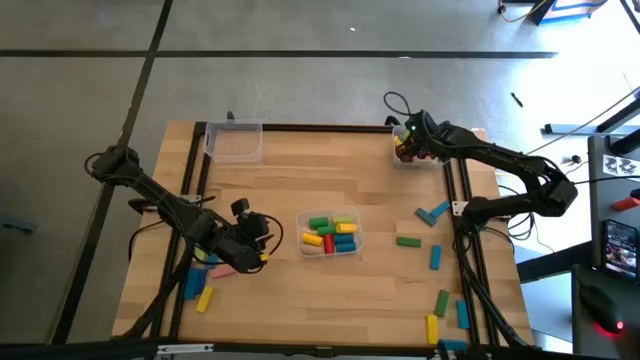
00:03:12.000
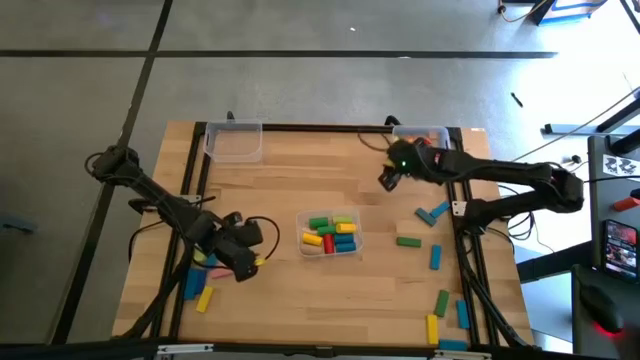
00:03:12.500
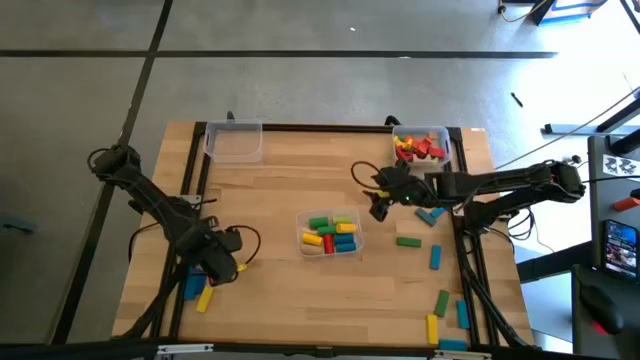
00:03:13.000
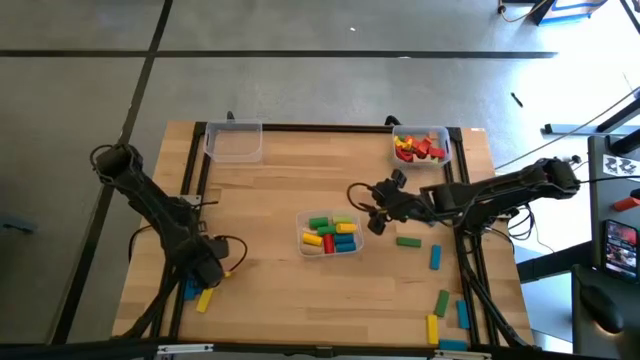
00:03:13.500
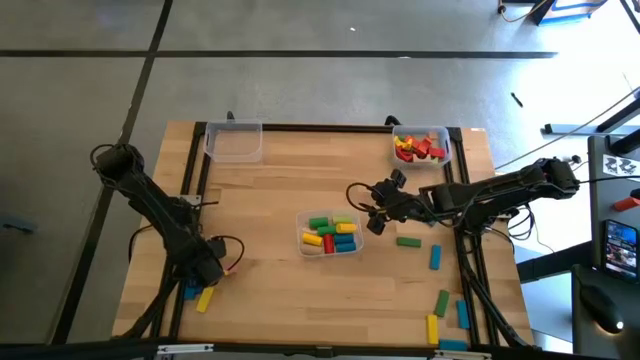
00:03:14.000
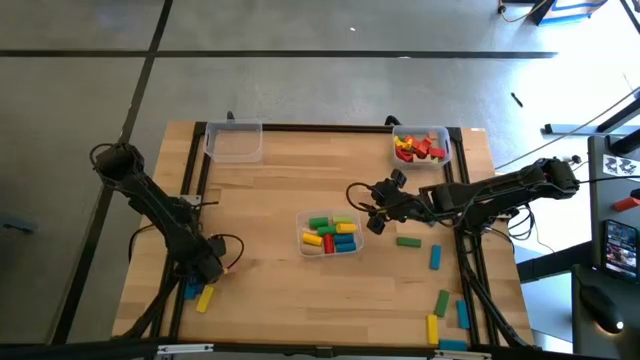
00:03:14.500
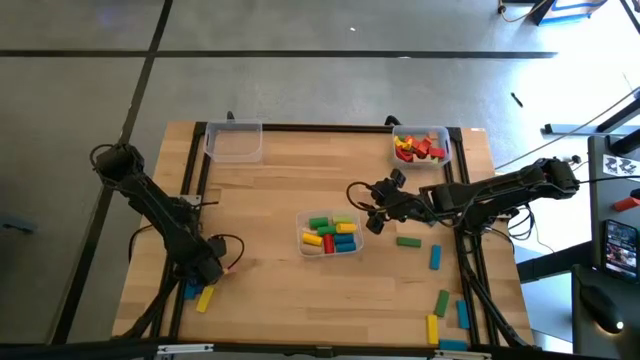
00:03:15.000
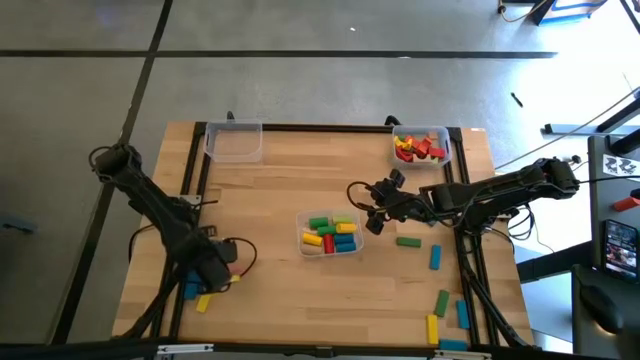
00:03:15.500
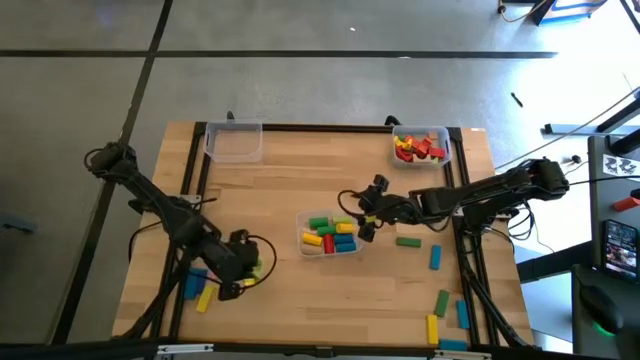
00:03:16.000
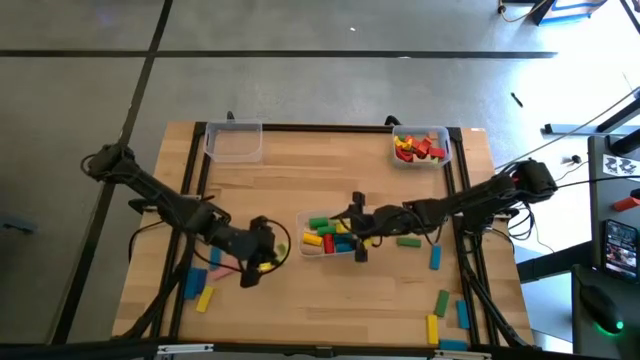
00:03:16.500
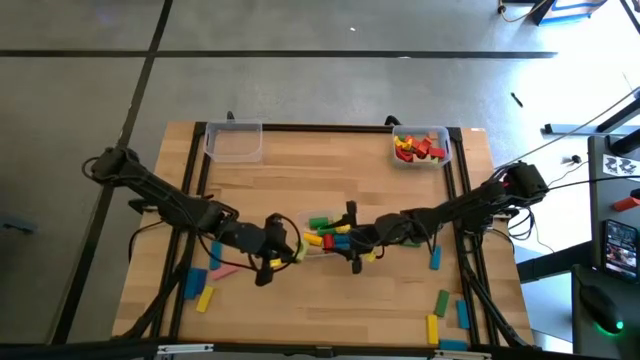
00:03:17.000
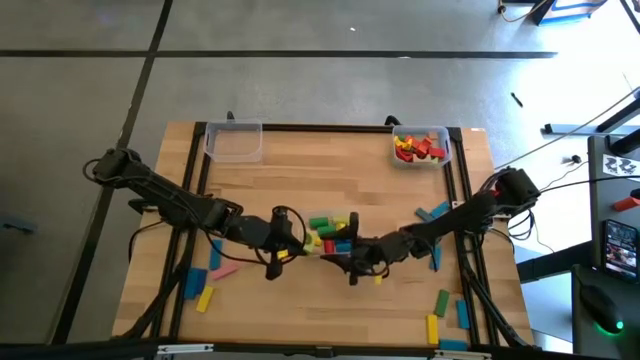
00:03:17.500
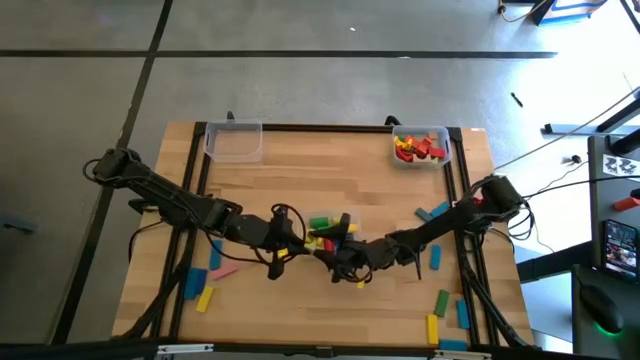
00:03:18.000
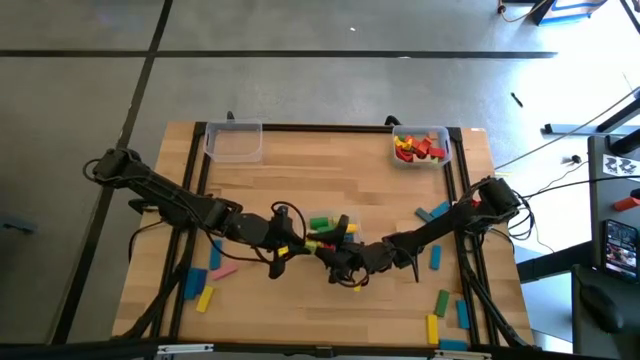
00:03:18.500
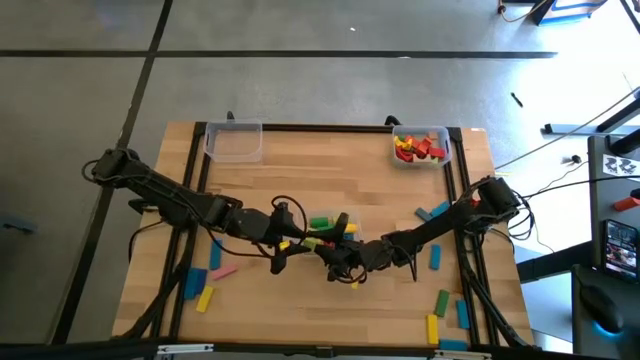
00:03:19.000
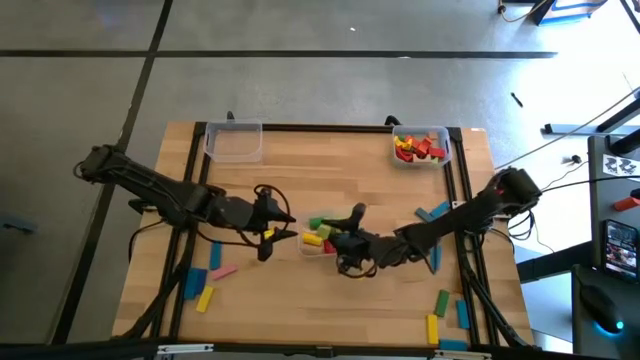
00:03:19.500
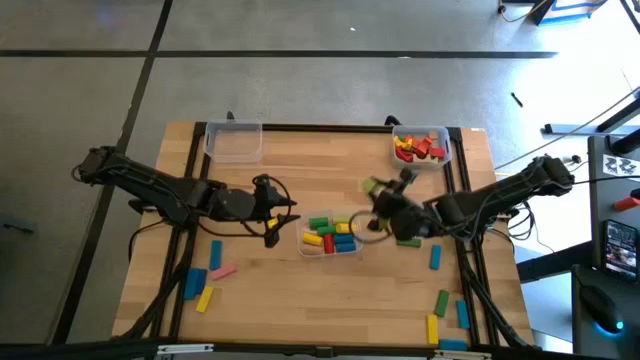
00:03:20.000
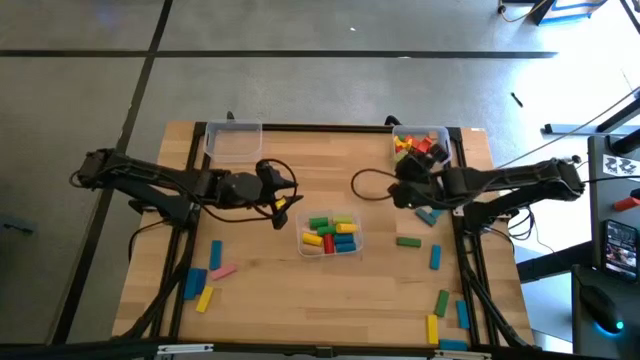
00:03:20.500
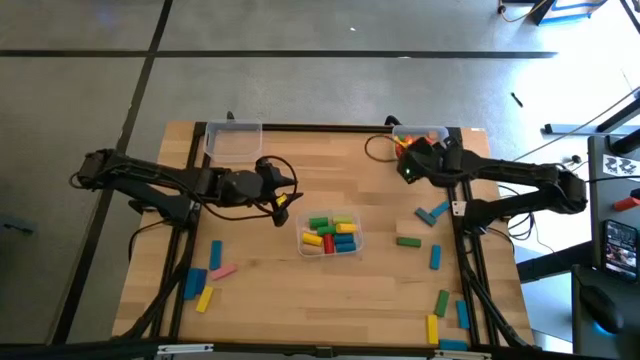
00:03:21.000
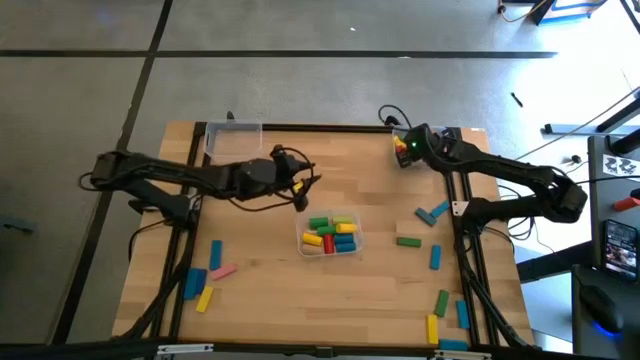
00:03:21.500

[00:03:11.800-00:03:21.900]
Task: Sort blocks by size
Put the light green arch block into the top right transparent bin

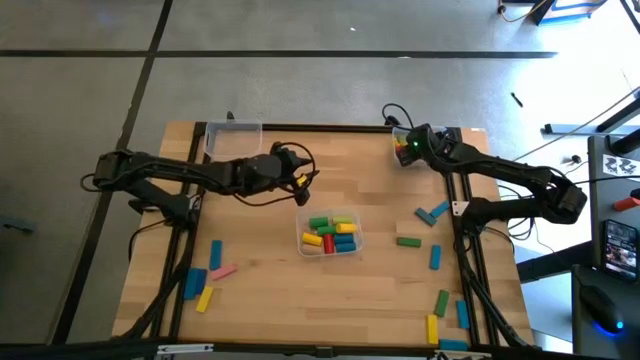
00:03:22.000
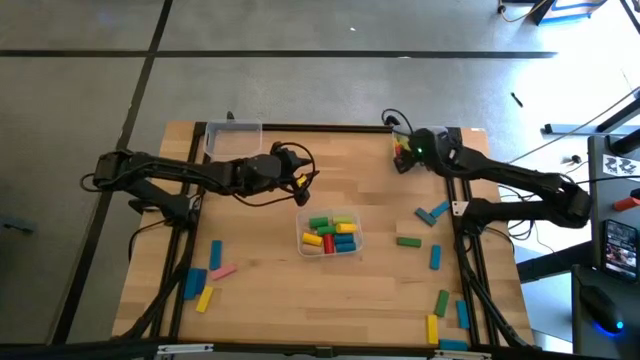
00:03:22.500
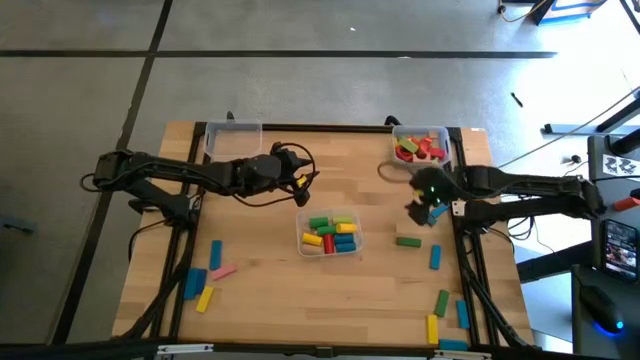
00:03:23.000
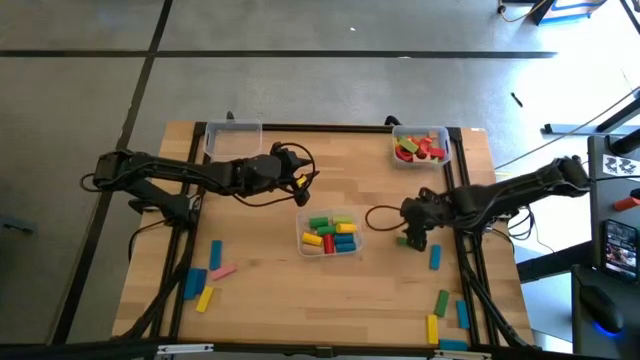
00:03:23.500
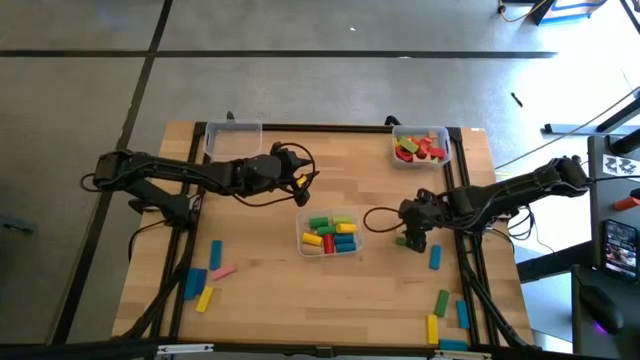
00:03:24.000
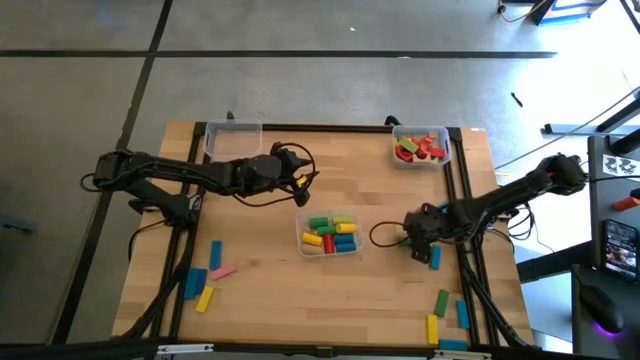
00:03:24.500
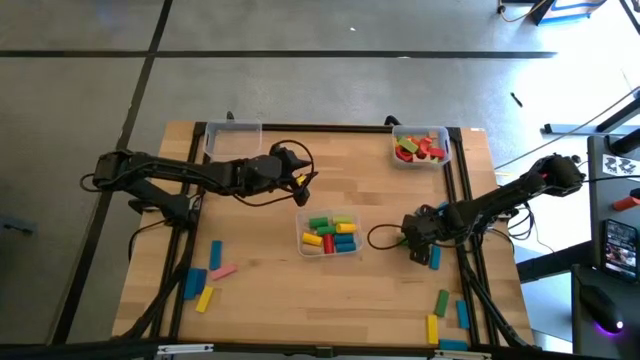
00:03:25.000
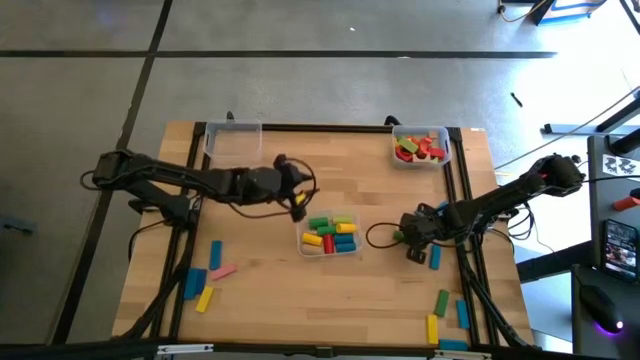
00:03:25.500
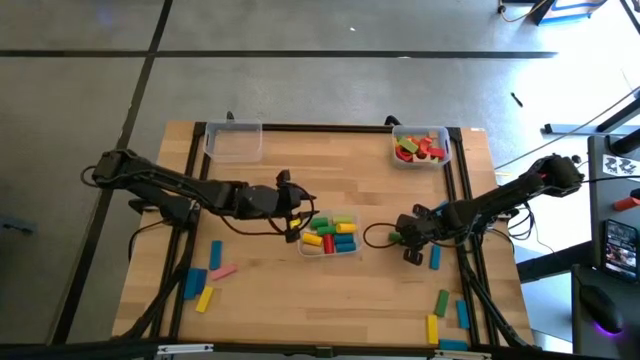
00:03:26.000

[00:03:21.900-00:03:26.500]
Put the green rectangular block into the top left transparent bin

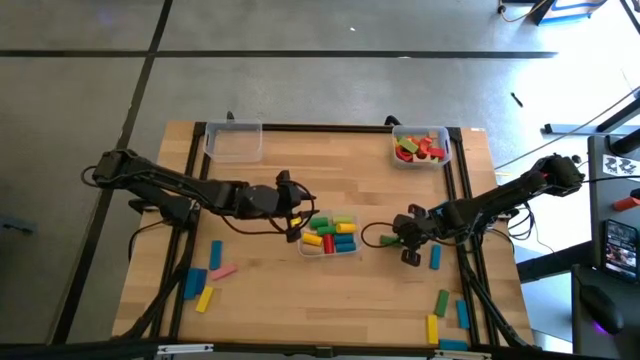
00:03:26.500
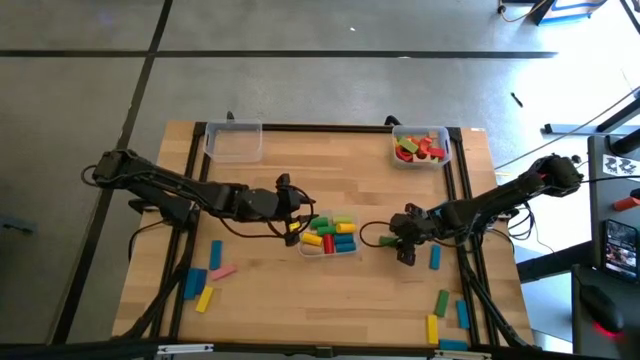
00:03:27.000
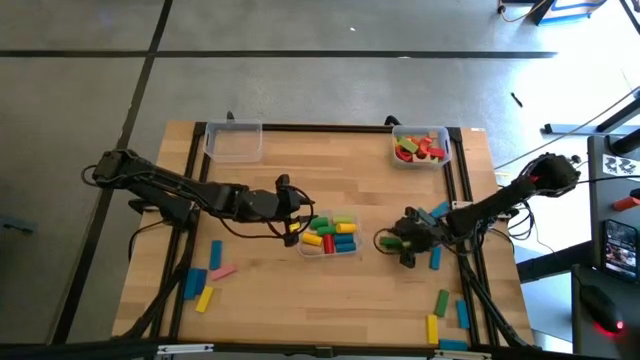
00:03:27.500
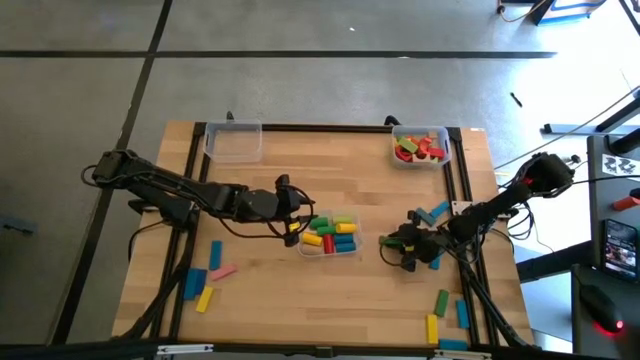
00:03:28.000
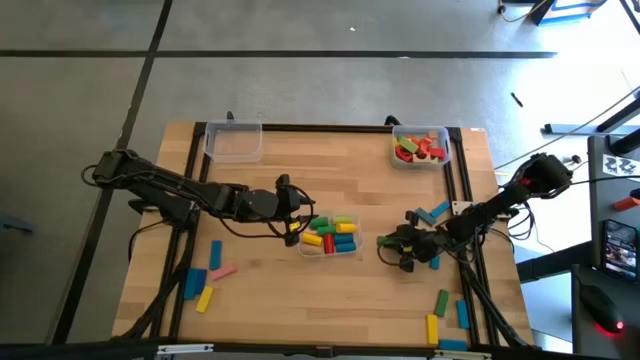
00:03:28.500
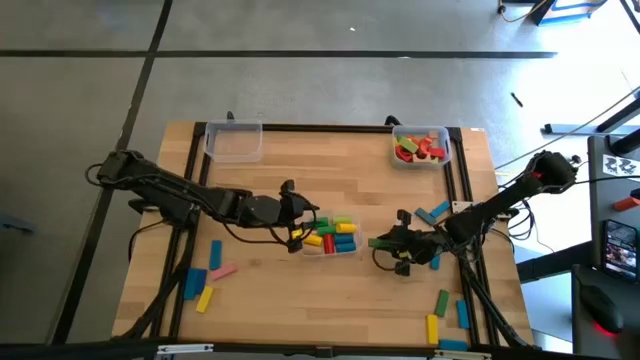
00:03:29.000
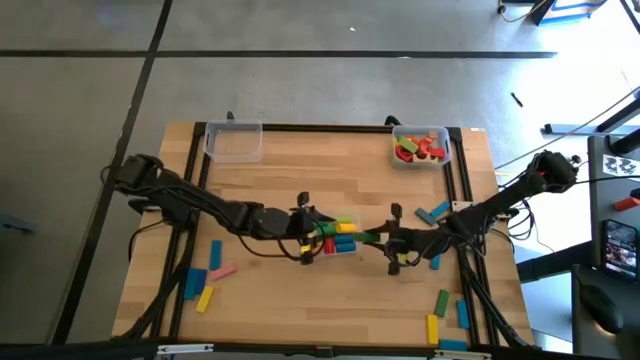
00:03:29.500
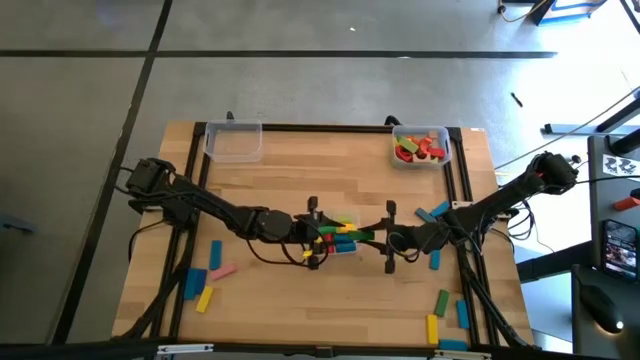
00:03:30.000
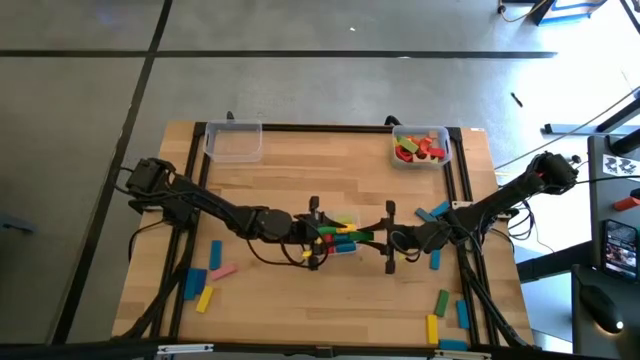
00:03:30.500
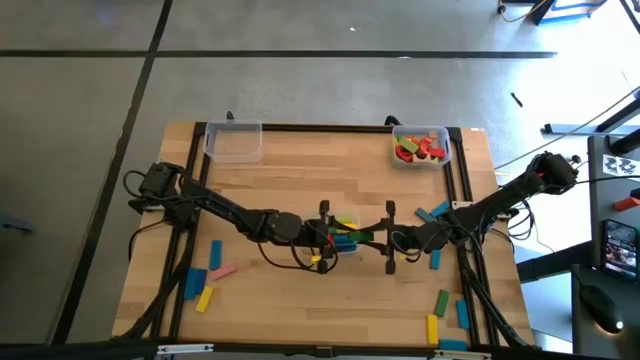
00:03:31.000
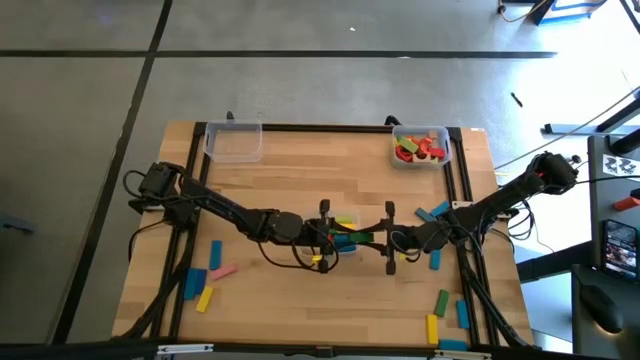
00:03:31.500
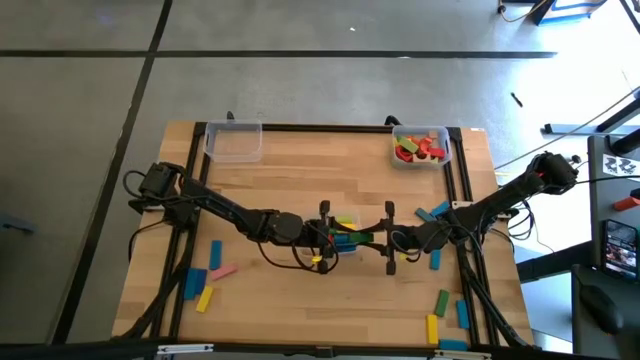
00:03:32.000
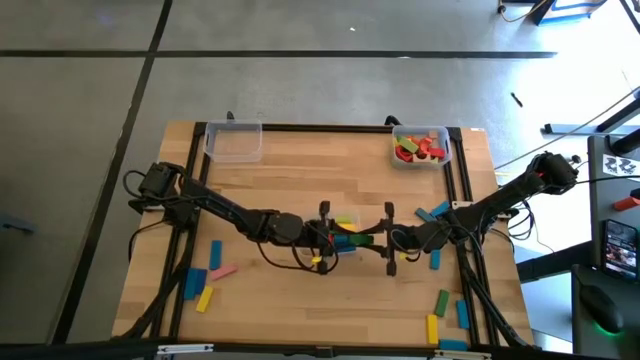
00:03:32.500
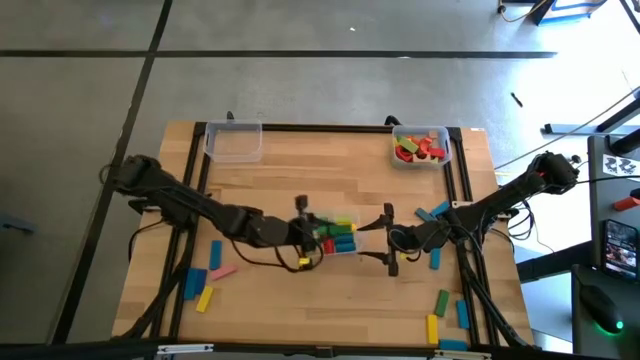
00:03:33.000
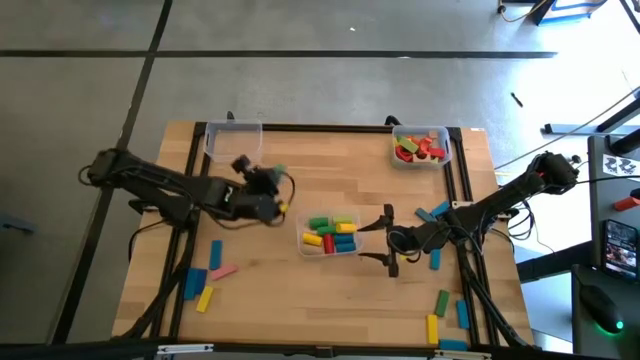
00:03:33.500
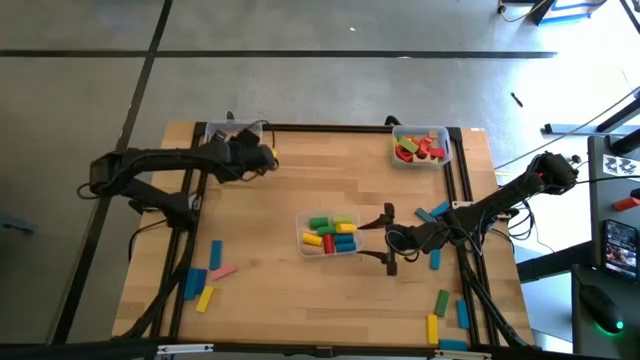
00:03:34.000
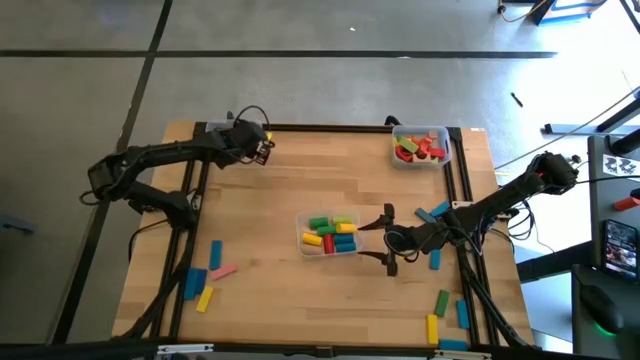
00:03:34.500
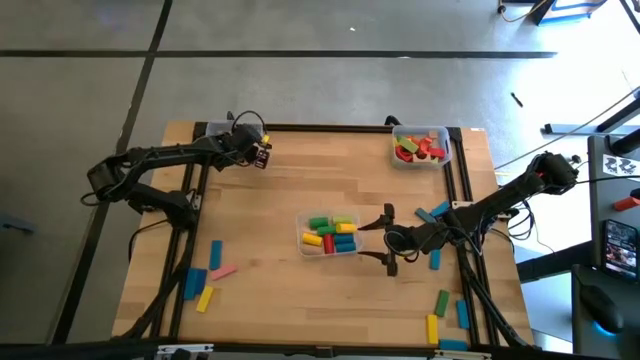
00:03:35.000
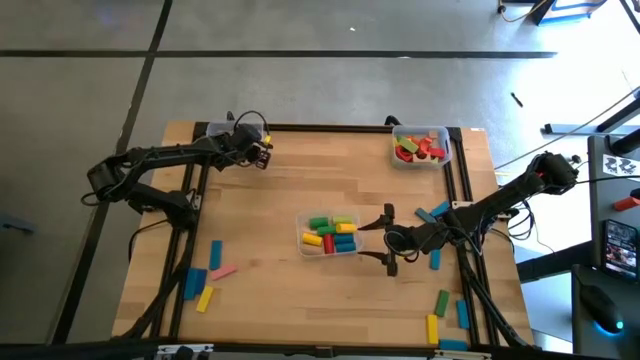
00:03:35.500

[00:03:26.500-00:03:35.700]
Put the green rectangular block into the top left transparent bin
